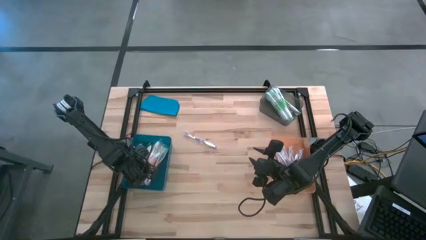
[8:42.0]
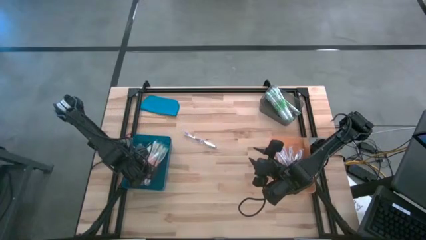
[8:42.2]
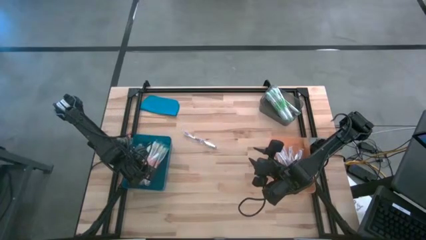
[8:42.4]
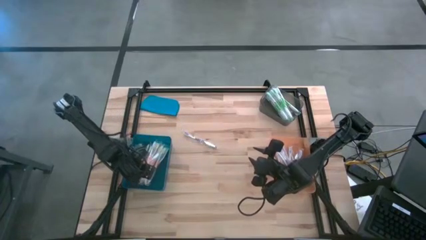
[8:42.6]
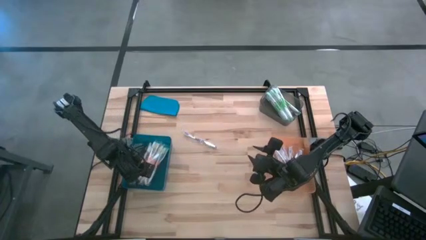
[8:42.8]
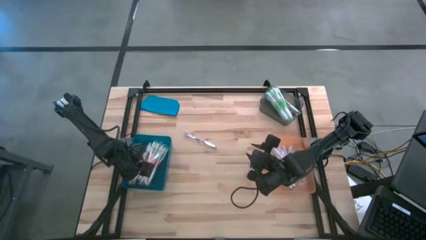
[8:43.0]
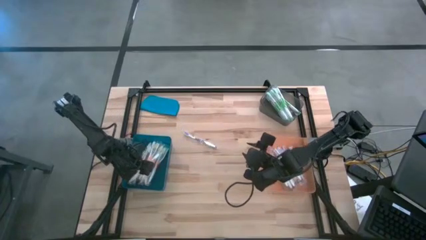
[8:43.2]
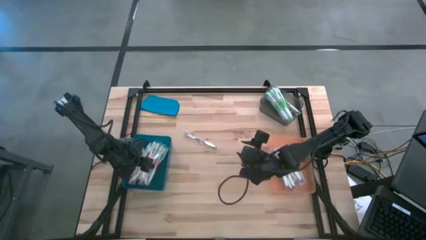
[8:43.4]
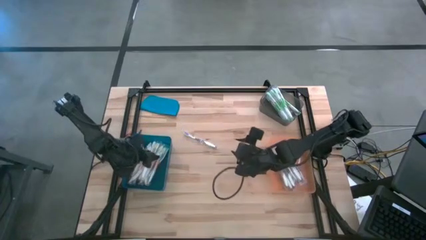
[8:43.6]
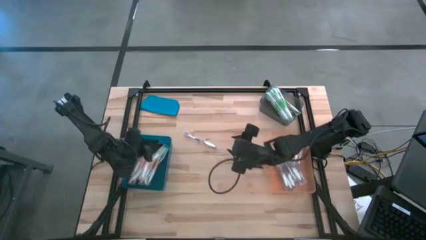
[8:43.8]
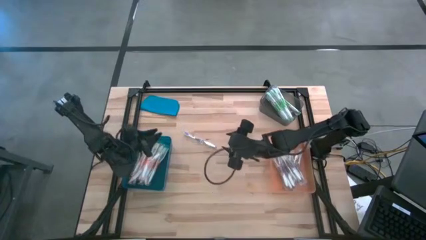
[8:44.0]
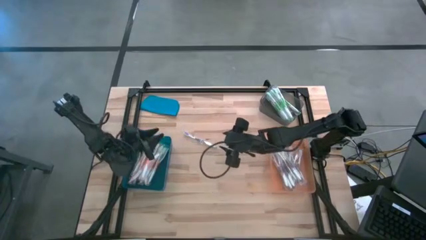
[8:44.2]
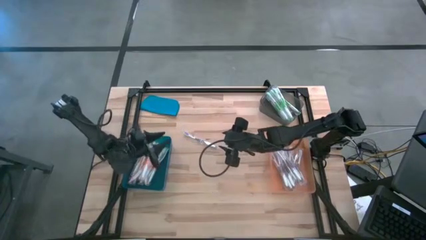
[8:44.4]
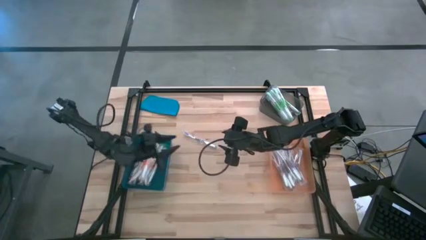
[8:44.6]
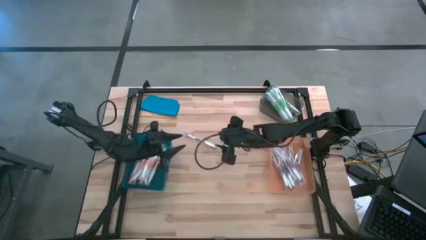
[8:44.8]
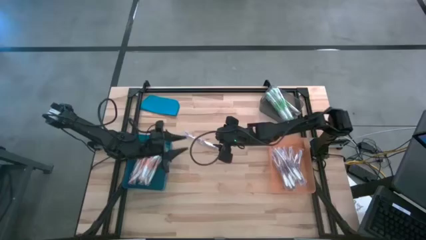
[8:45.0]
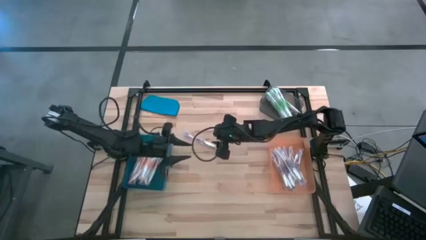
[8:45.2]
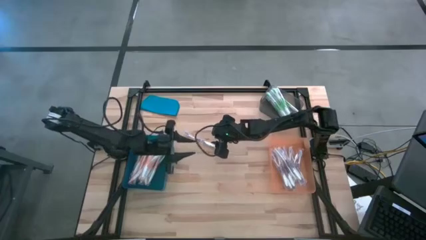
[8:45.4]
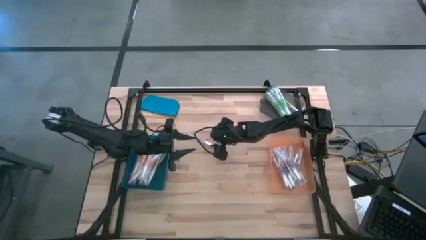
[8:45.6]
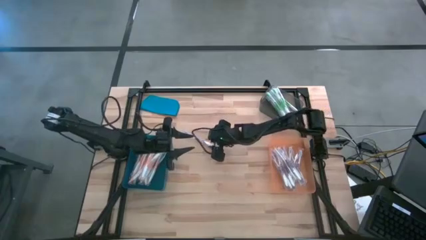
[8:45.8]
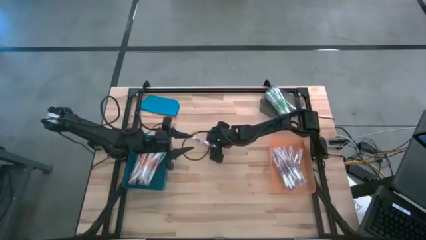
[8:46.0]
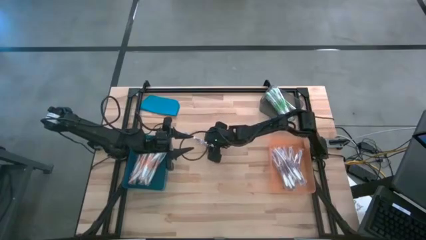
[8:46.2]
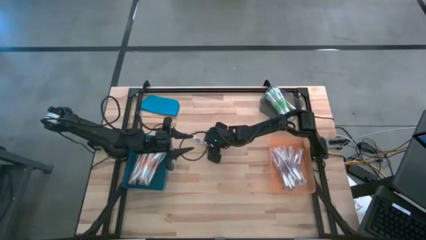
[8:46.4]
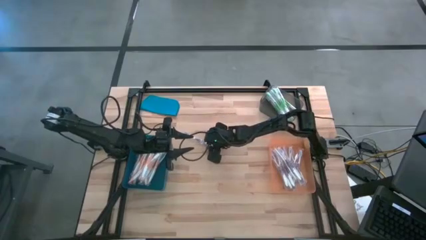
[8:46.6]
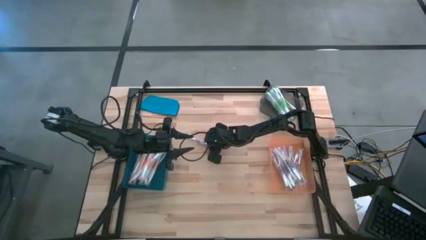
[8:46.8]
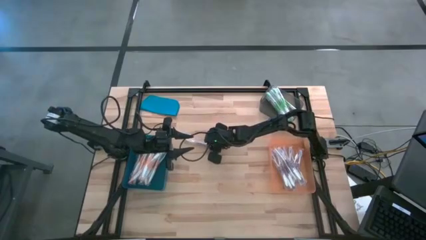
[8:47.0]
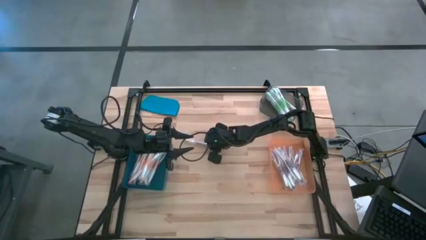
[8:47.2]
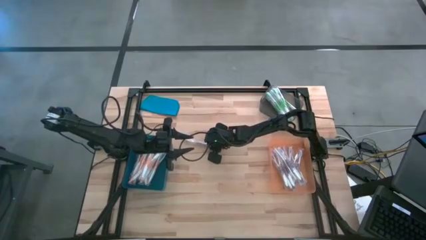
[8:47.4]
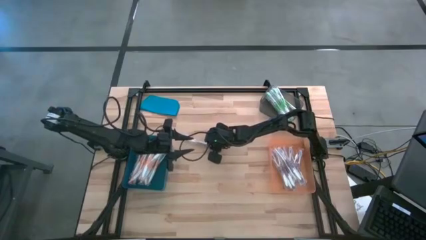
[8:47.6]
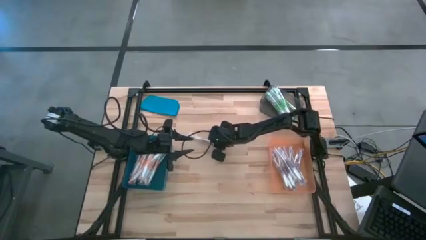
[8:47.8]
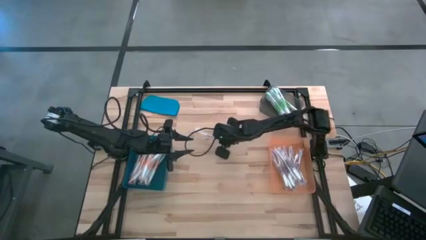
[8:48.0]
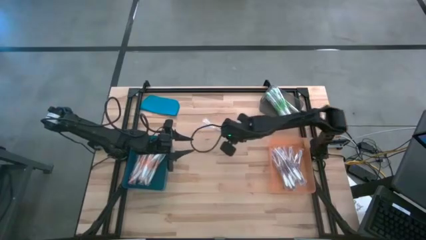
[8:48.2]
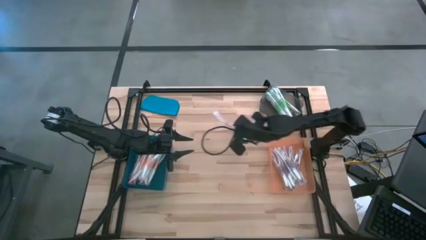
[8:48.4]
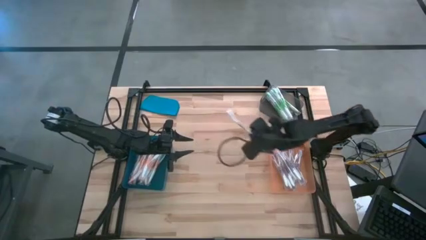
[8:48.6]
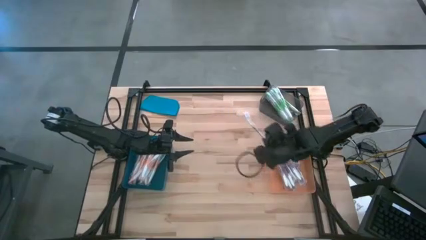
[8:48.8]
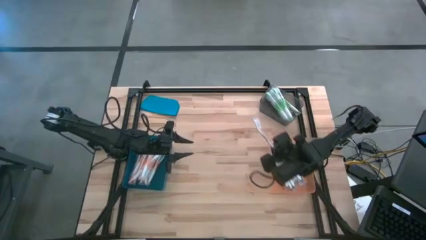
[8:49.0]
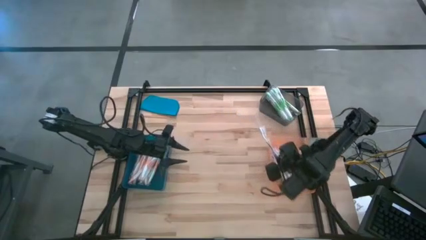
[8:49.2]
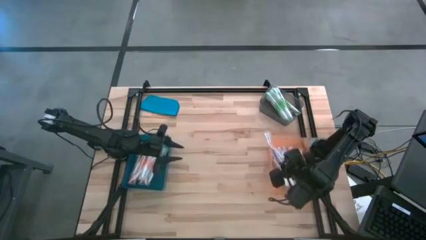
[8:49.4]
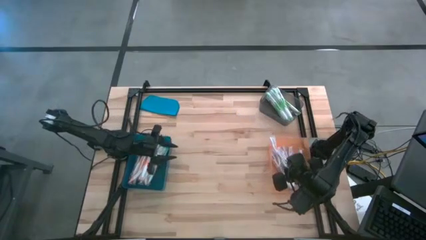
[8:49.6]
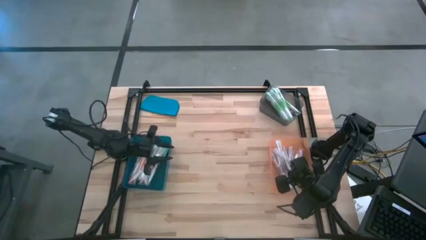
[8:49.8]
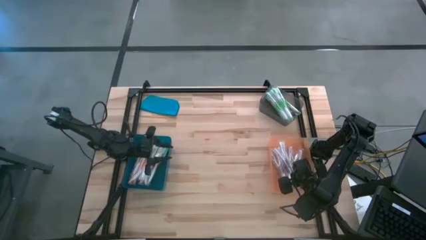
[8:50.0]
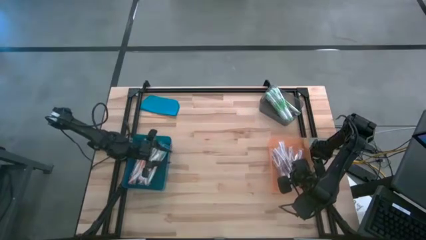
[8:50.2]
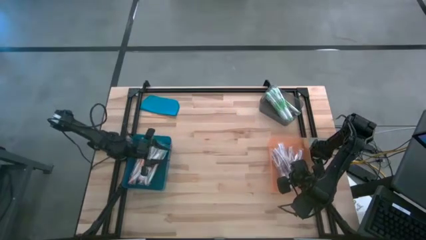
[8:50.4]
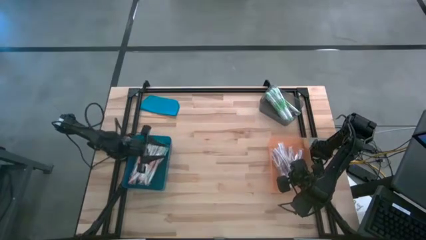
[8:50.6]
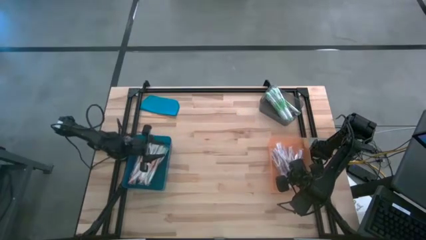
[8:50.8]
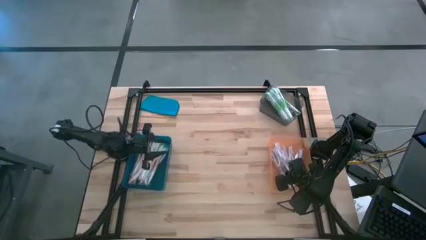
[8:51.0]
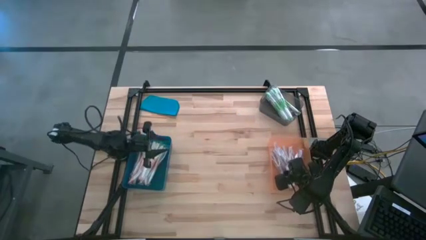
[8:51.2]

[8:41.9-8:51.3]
Task: Pick & Place Toothbrushes
Put the purple toothbrush into the orange bin

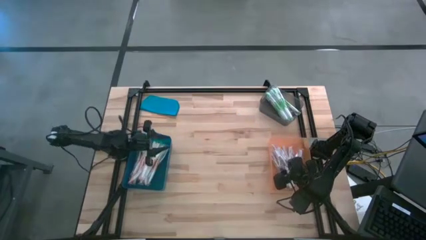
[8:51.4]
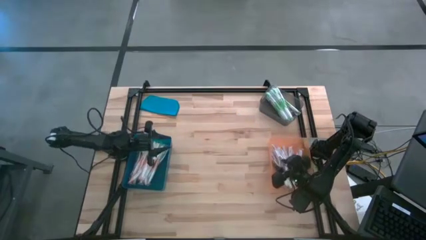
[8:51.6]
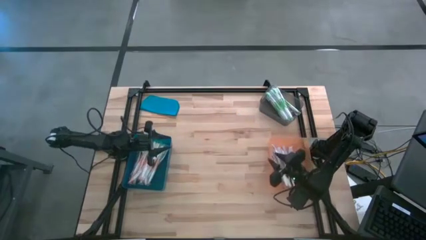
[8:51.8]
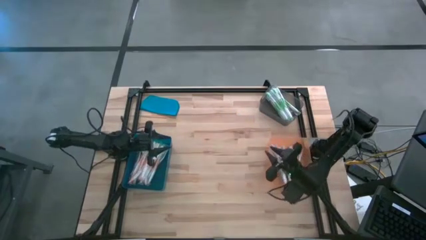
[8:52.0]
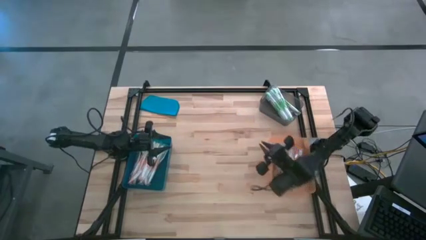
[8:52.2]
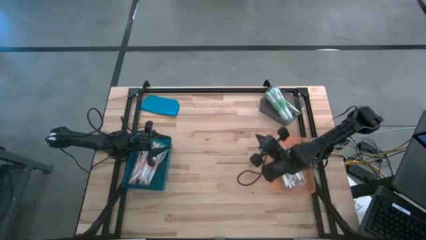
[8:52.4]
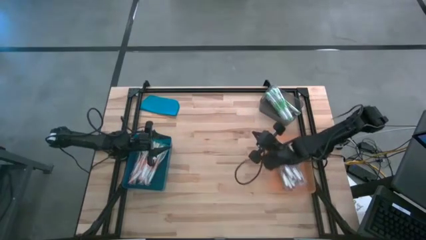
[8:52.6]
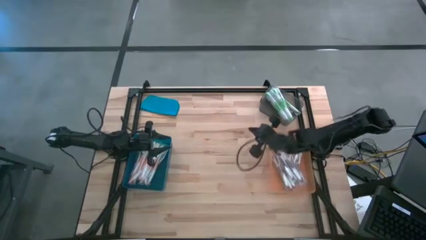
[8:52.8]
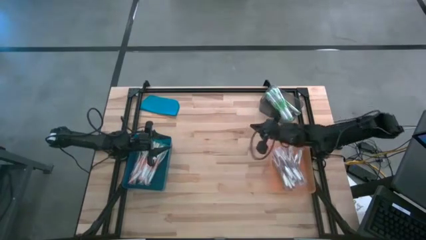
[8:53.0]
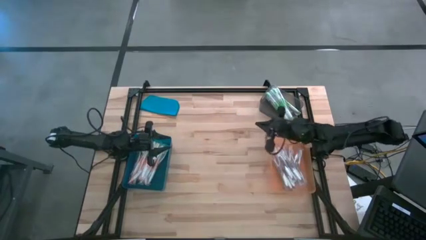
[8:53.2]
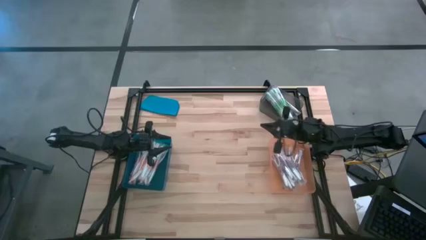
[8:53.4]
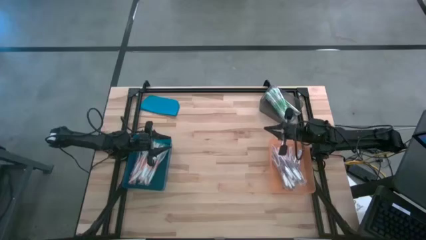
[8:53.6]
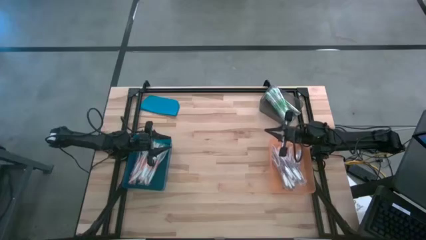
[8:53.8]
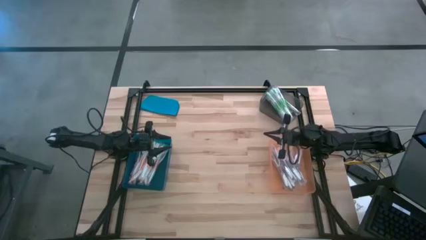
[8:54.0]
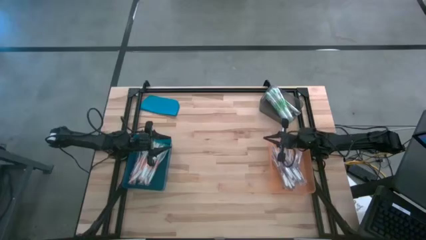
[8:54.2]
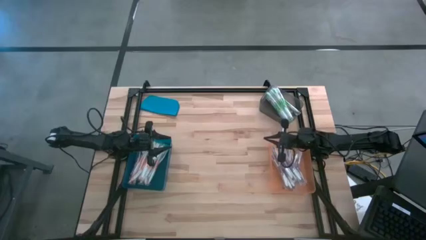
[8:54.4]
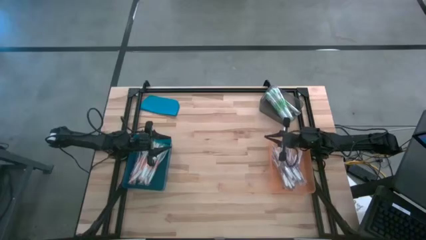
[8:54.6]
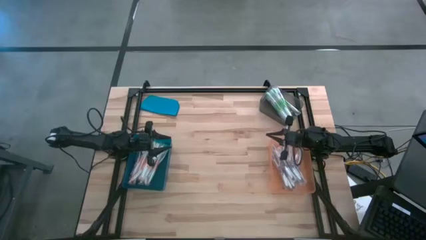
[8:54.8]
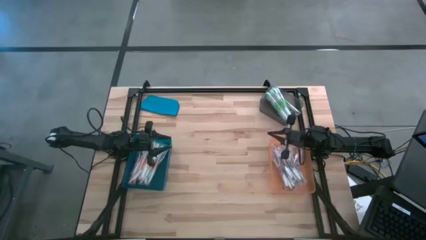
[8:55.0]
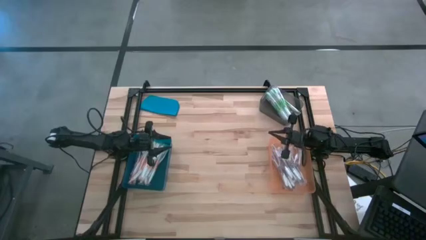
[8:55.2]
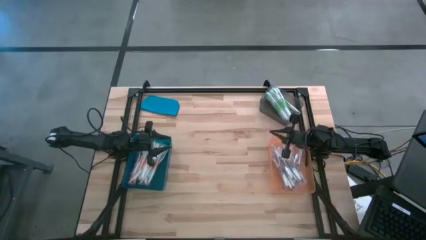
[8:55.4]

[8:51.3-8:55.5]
Return to Home Position
